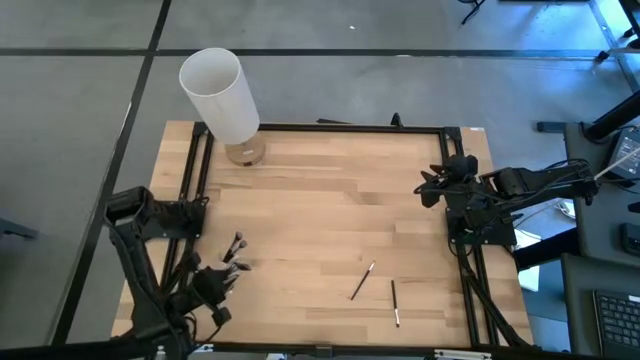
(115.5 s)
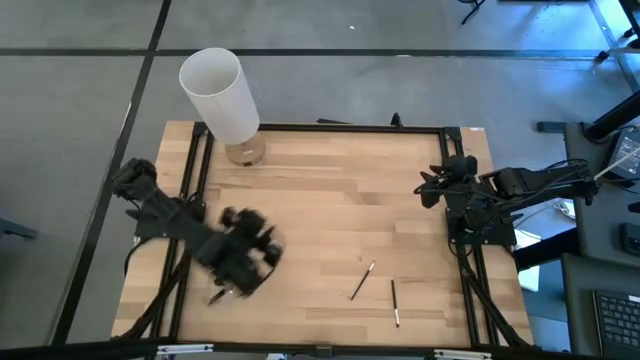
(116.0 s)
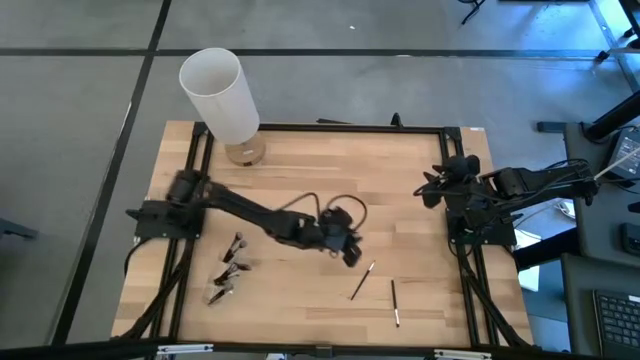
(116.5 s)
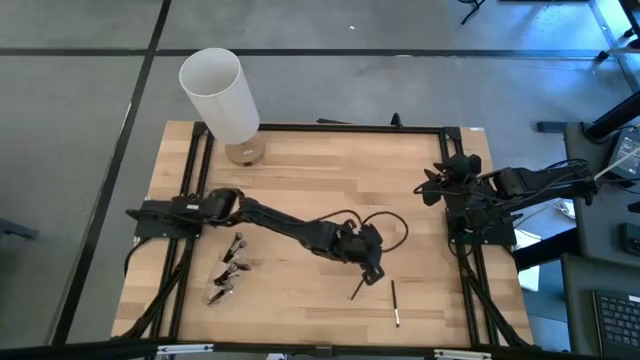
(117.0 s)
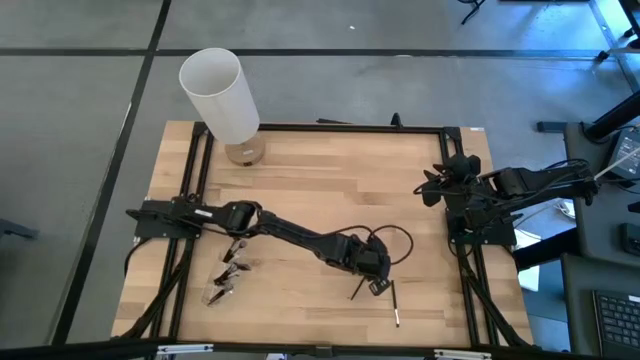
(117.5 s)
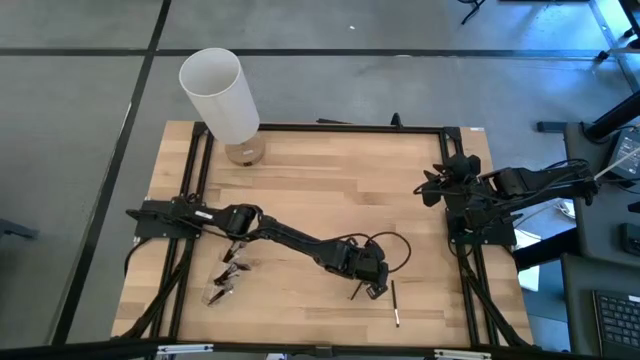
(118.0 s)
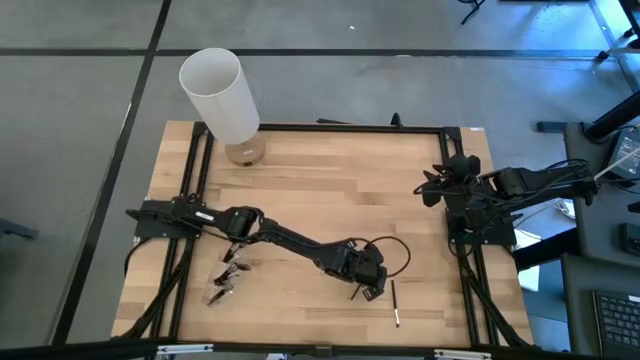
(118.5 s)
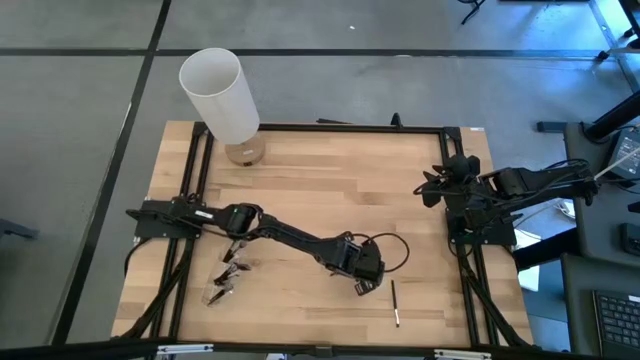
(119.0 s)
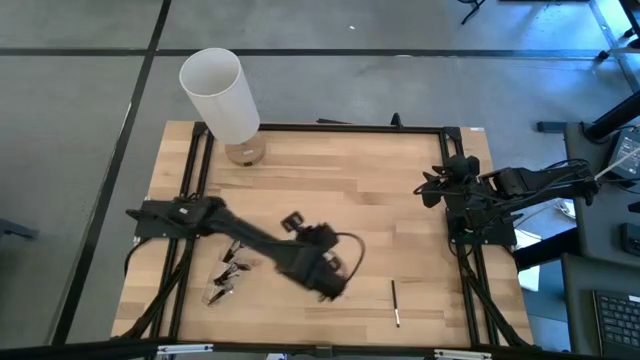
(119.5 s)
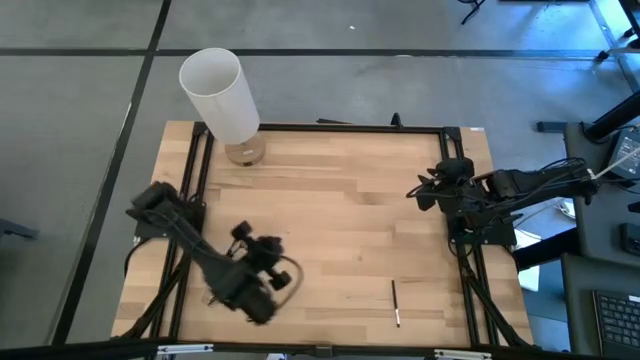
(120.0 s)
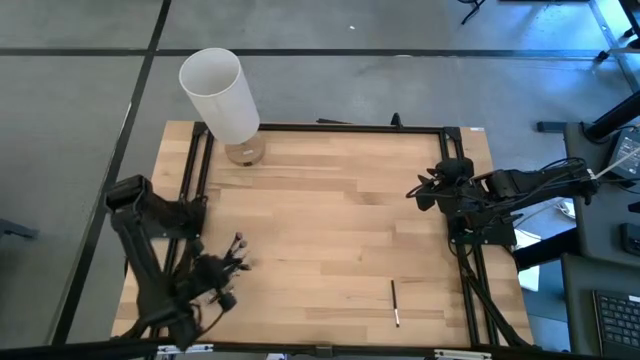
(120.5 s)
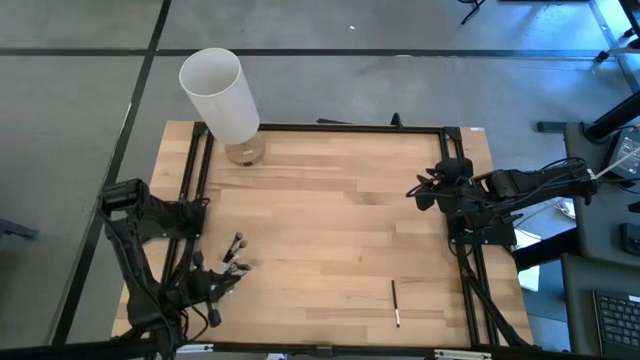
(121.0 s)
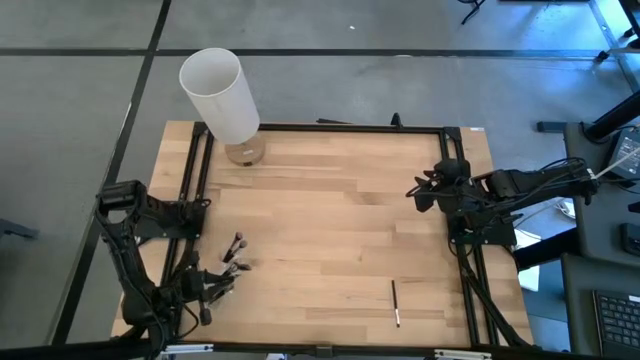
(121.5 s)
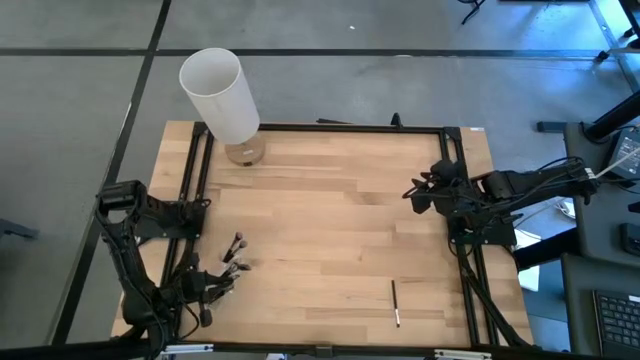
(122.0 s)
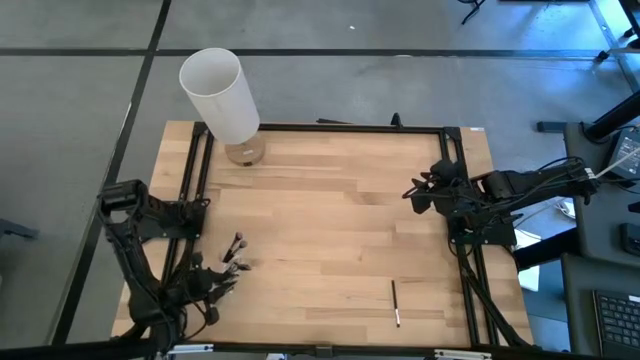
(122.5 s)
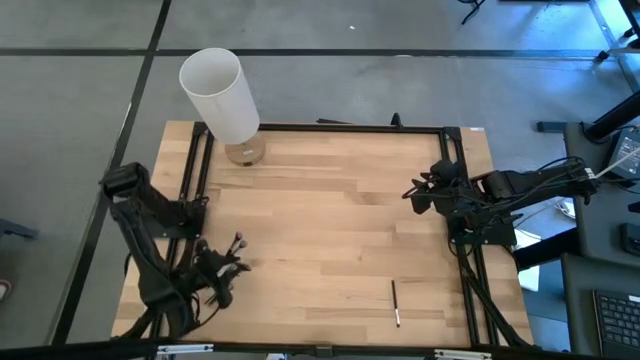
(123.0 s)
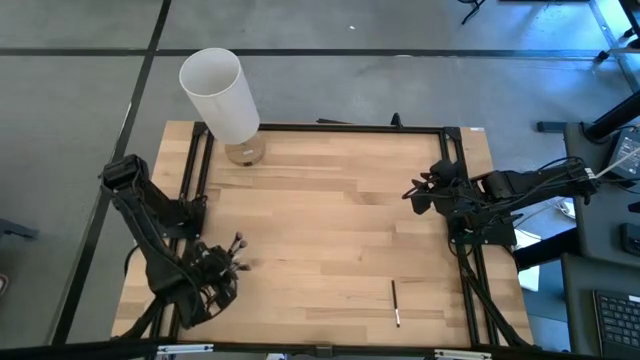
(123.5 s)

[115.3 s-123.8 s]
Task: Put items in baskets/containers
Put the black eyeshadow brush into the transparent organizer

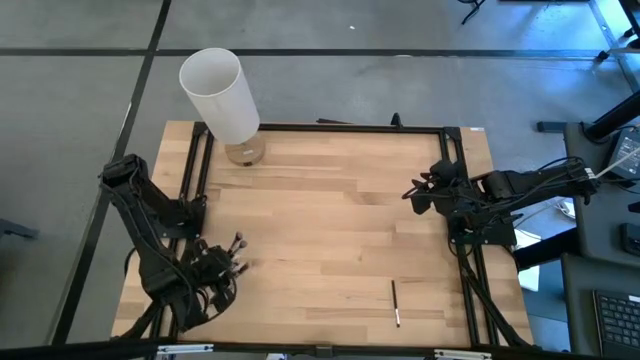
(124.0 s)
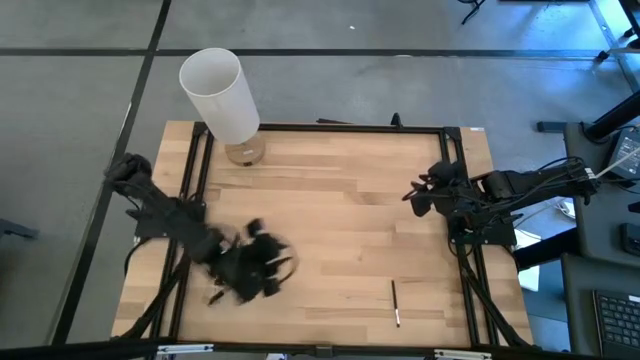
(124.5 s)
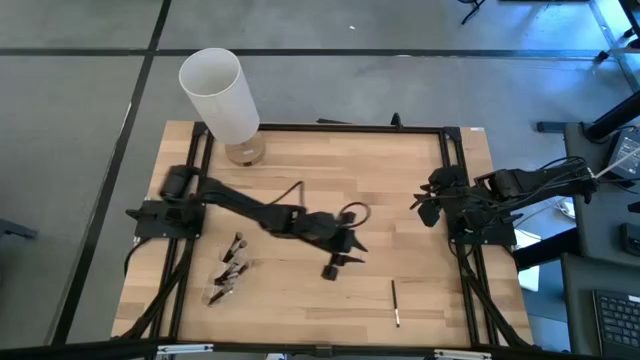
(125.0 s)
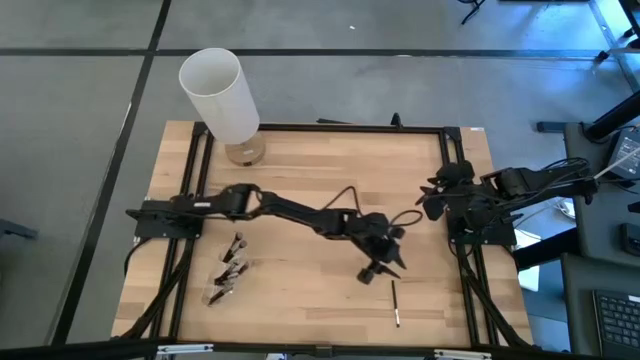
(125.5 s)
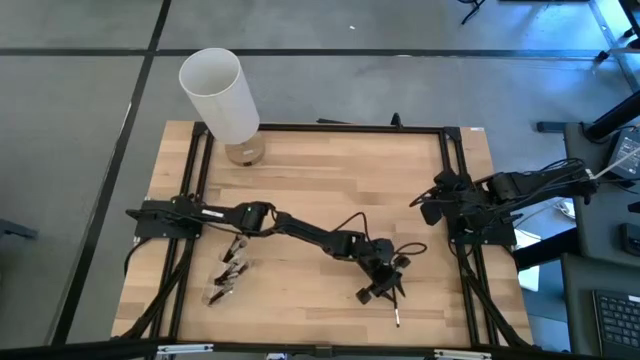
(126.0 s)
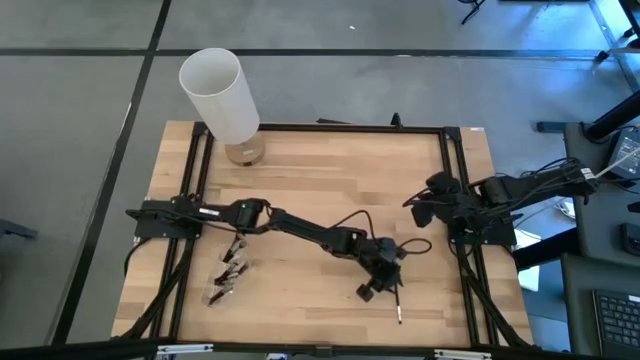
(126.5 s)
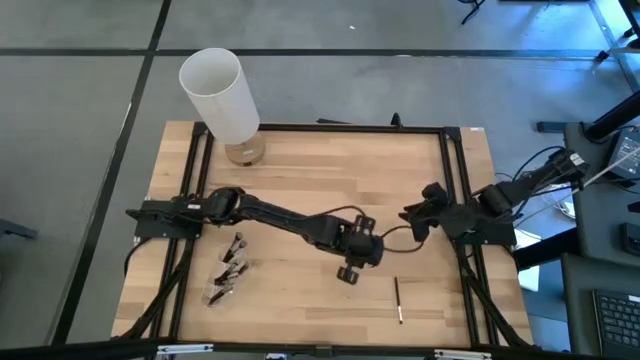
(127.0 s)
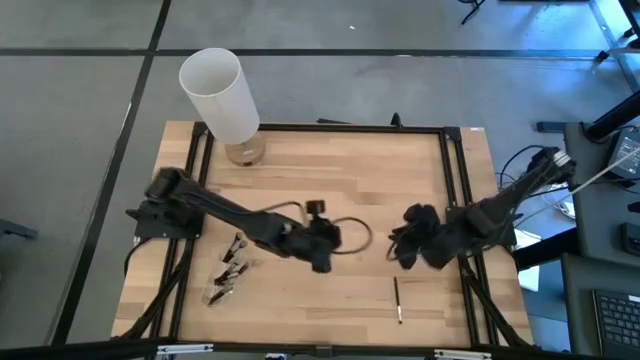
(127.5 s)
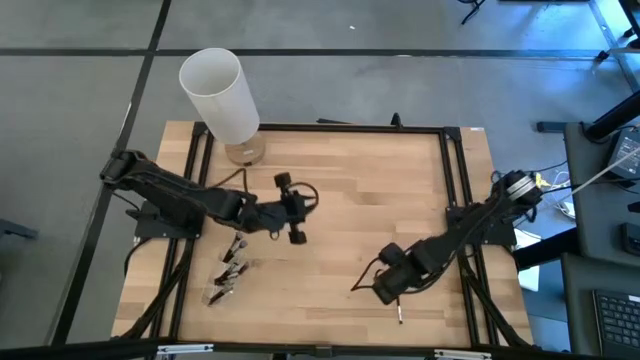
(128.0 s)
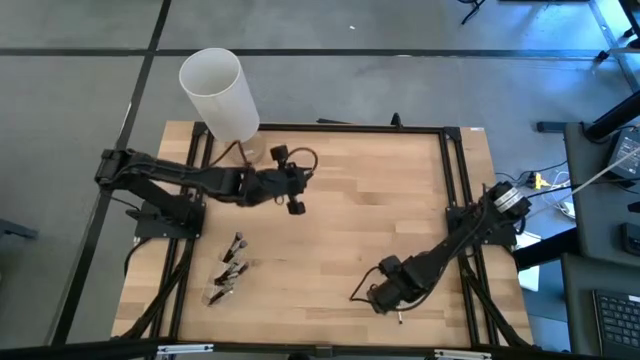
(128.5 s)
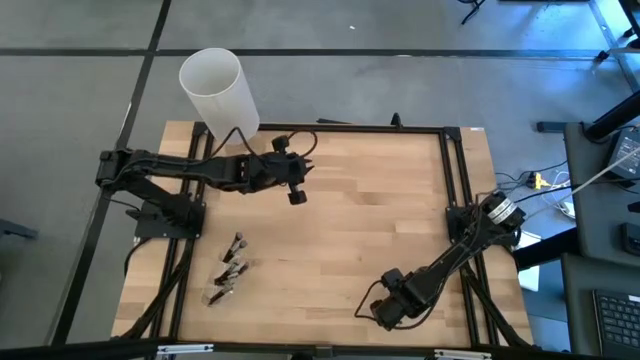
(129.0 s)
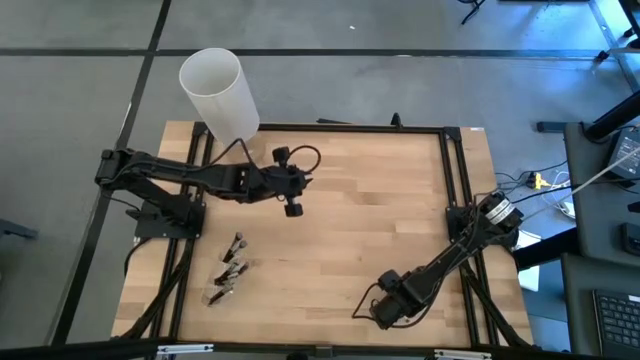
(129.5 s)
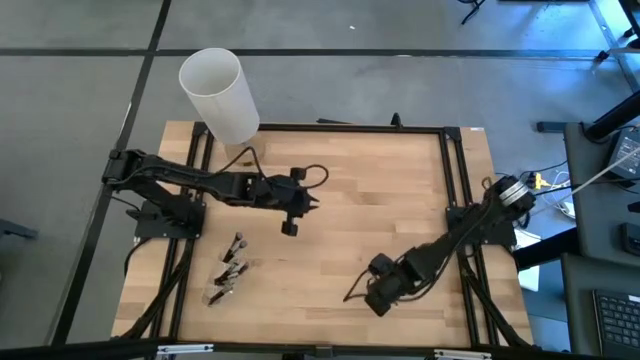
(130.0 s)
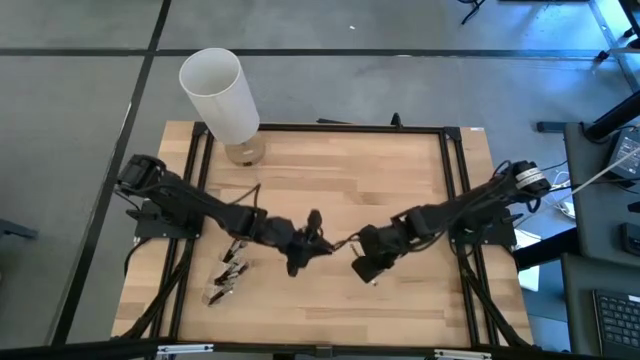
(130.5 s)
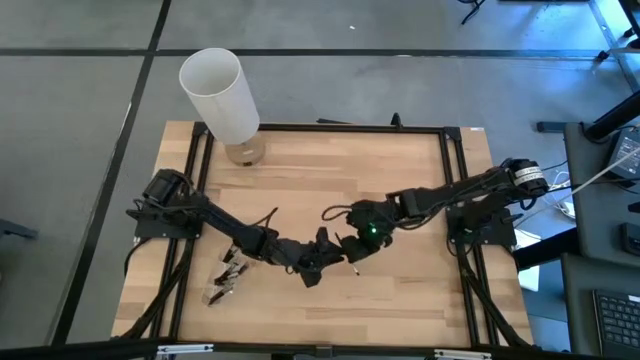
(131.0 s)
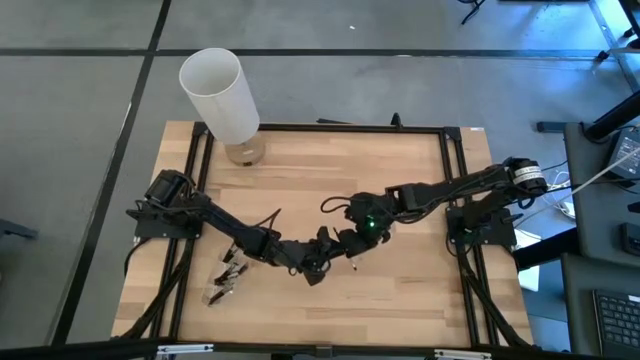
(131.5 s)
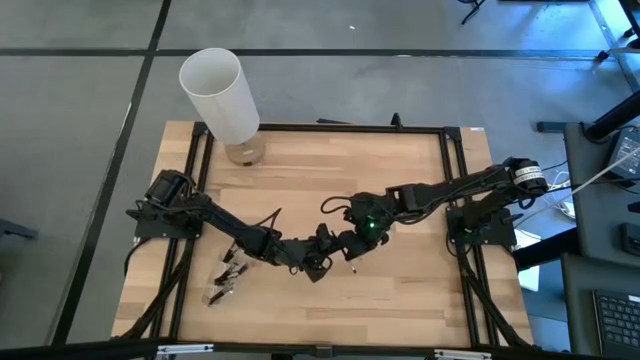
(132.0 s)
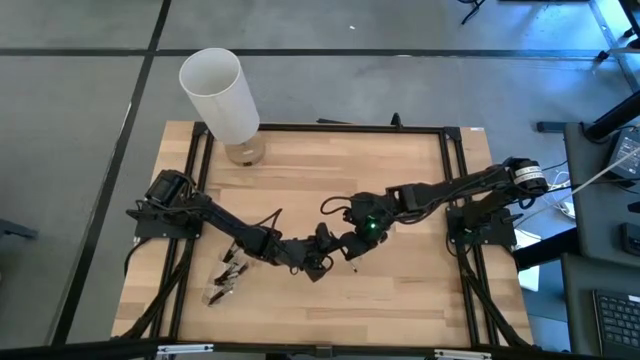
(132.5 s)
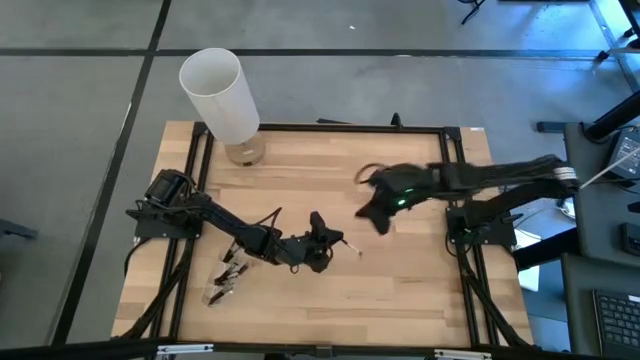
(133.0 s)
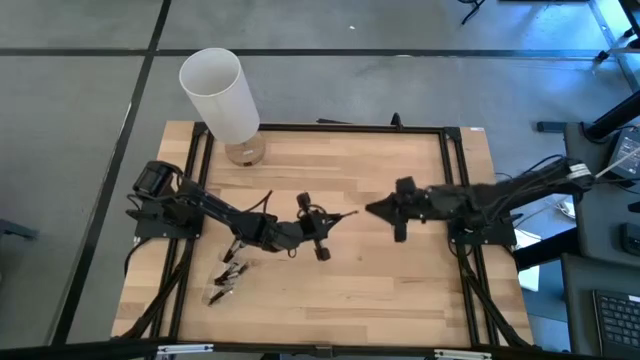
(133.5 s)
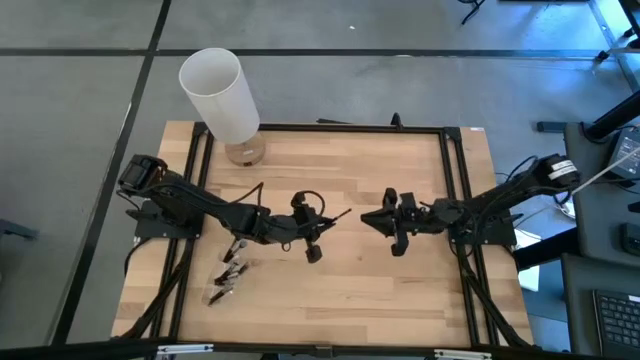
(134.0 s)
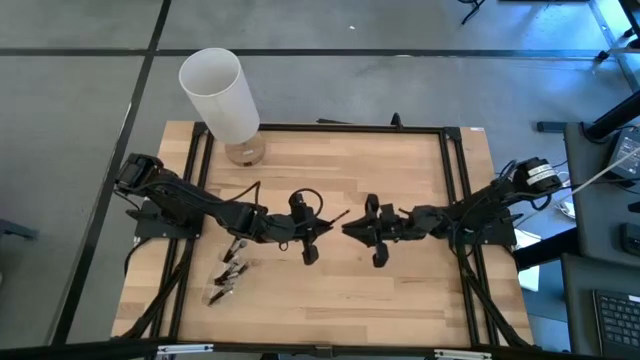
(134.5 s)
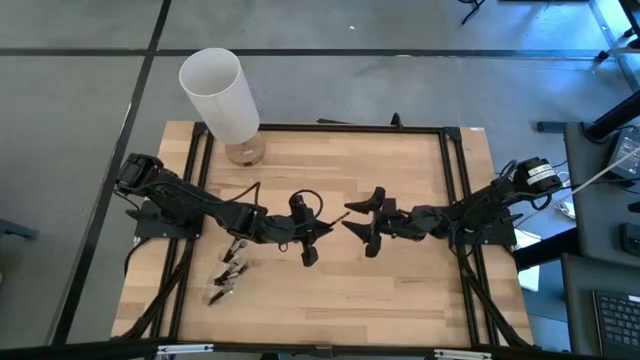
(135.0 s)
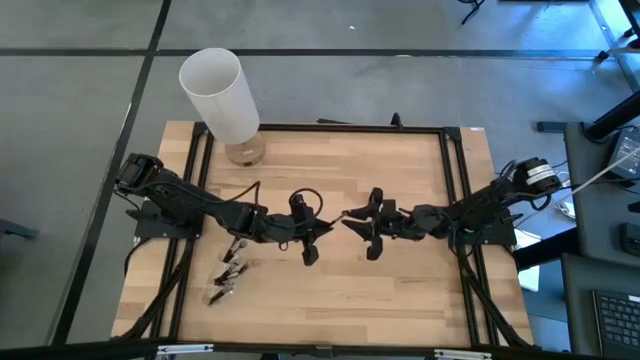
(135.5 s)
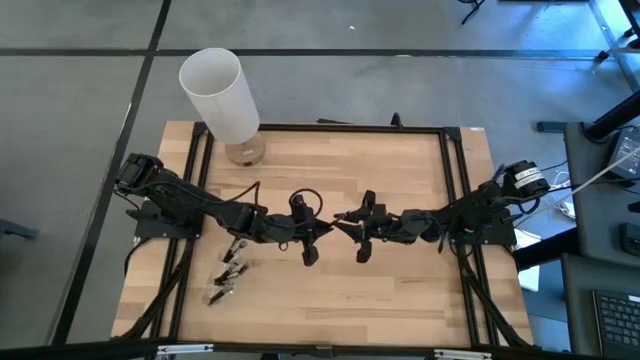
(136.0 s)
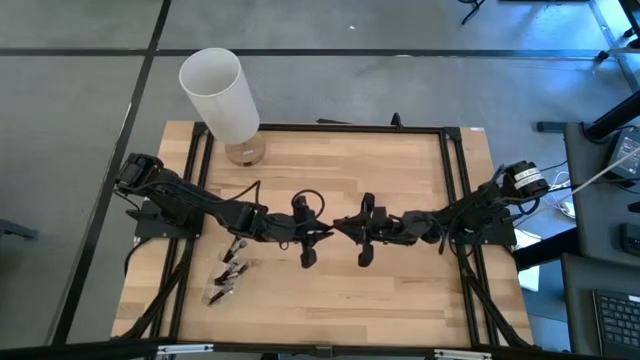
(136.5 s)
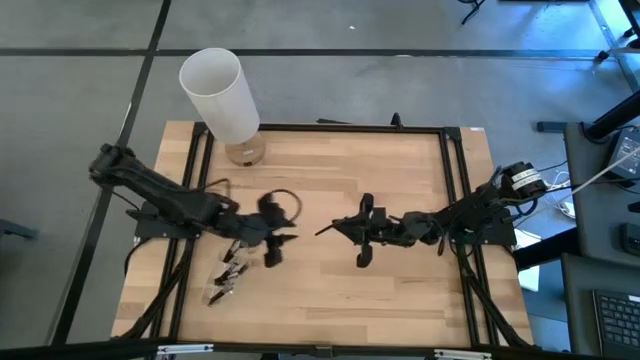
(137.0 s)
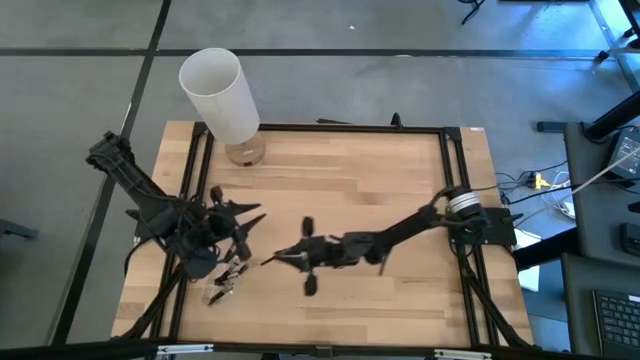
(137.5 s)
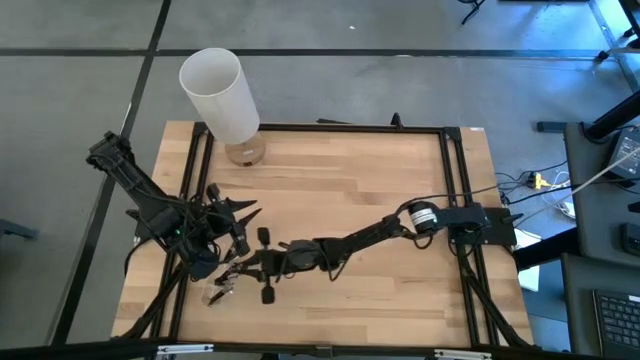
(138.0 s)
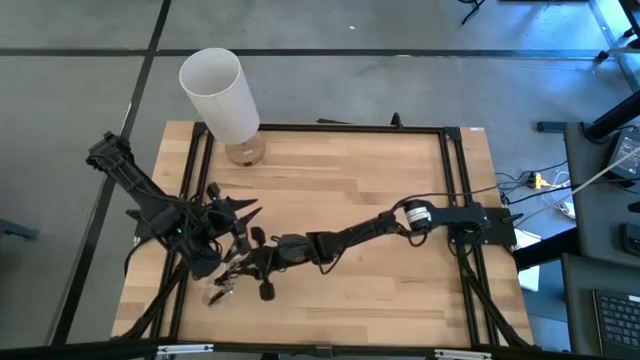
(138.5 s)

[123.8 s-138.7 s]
Put the black eyeshadow brush into the transparent organizer
